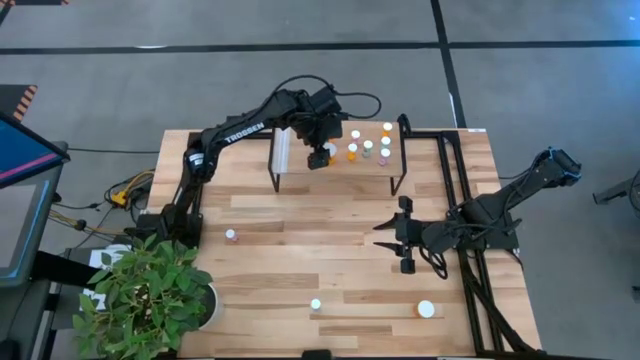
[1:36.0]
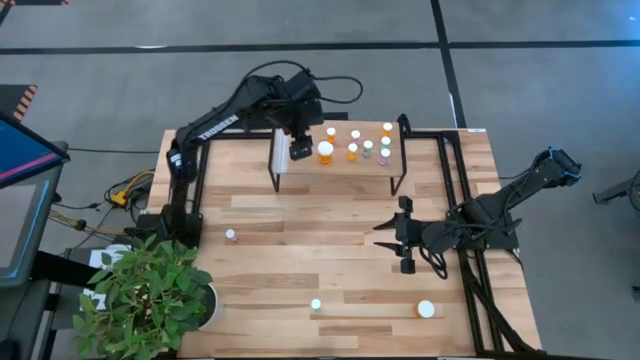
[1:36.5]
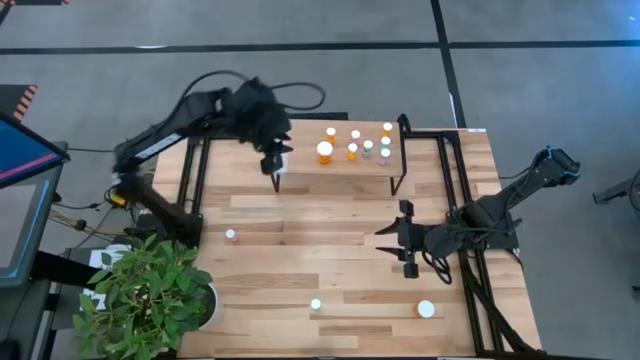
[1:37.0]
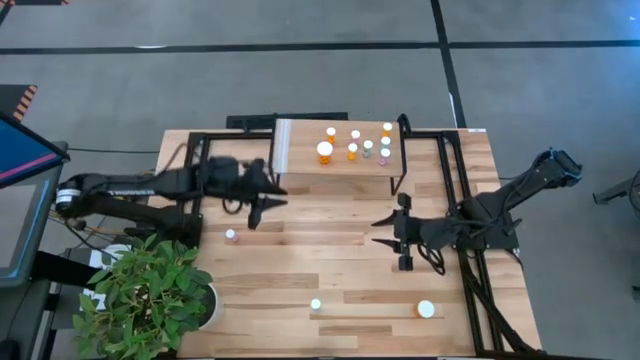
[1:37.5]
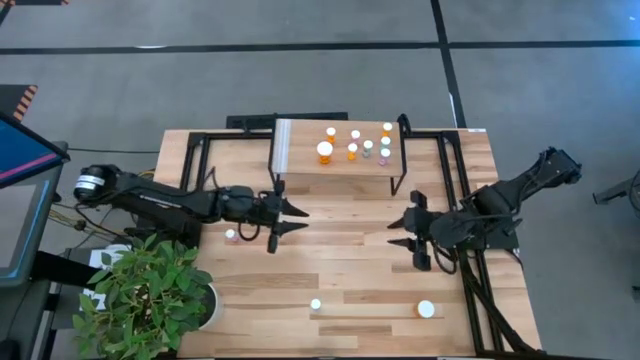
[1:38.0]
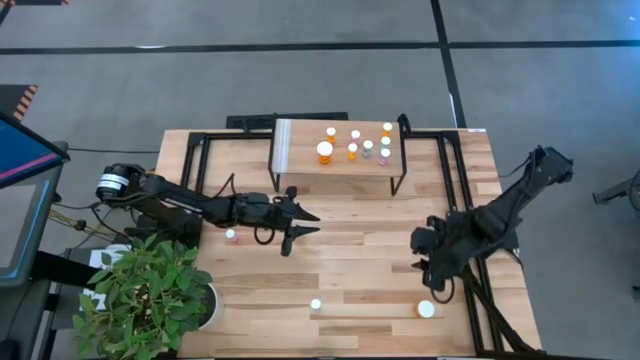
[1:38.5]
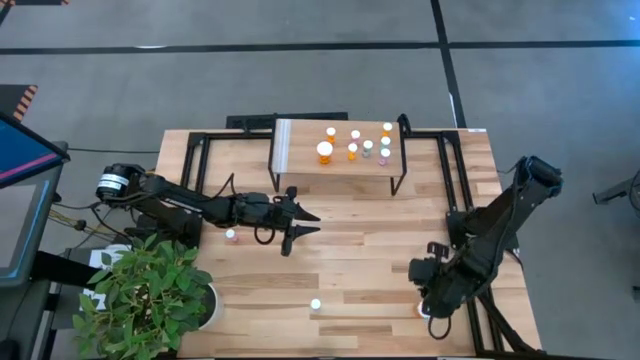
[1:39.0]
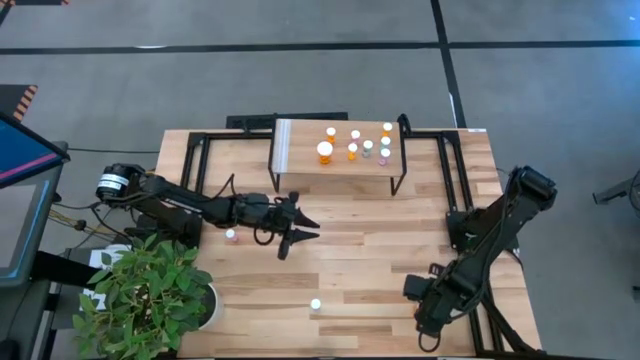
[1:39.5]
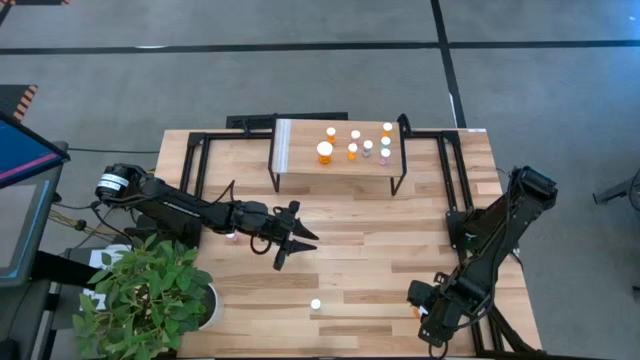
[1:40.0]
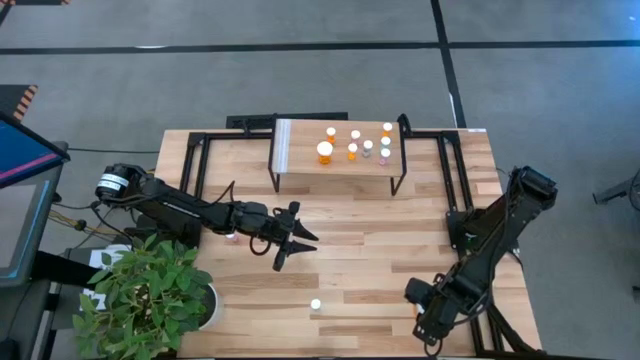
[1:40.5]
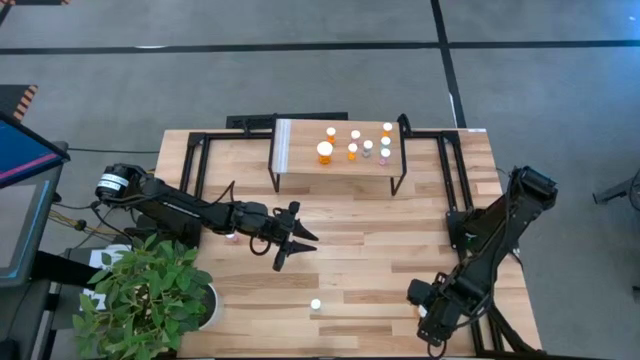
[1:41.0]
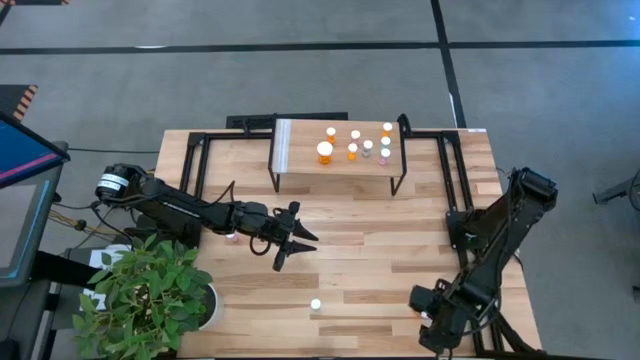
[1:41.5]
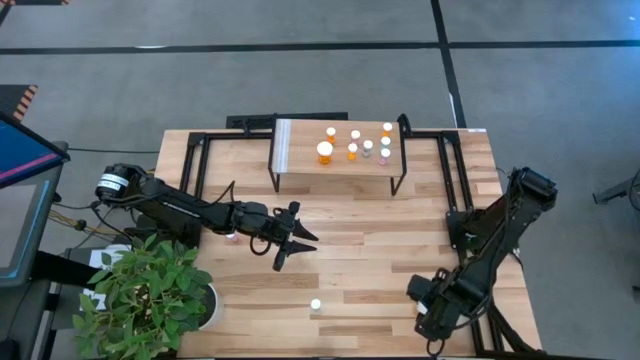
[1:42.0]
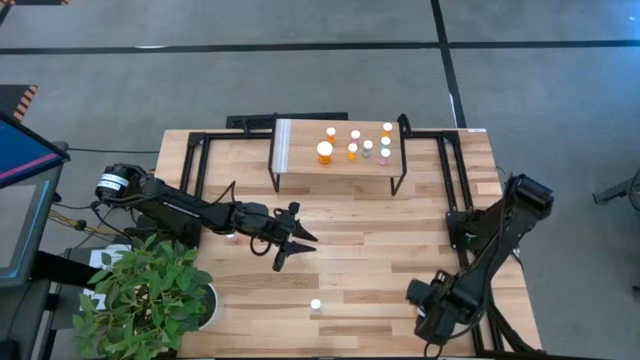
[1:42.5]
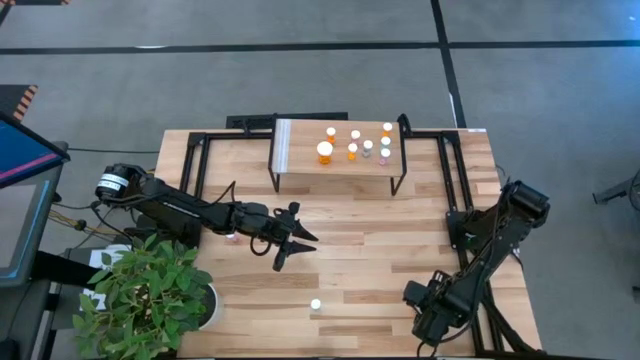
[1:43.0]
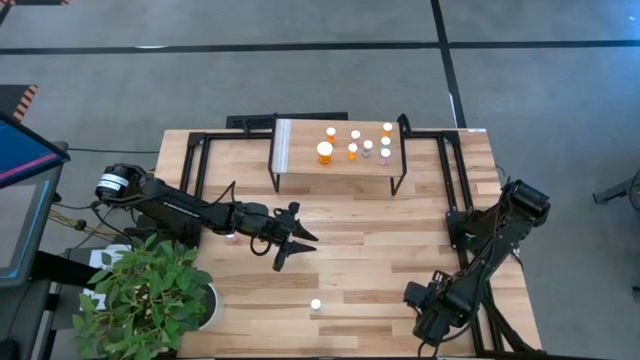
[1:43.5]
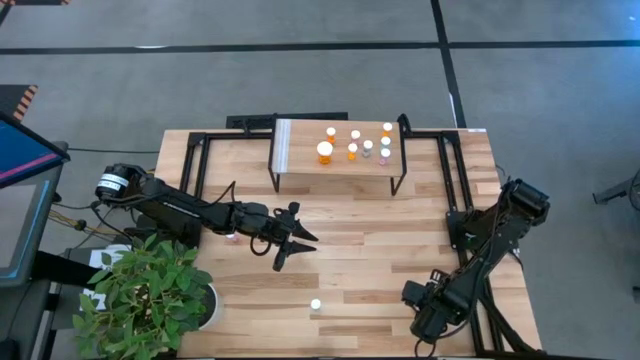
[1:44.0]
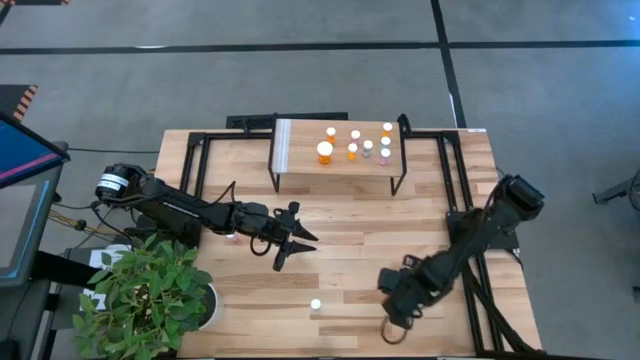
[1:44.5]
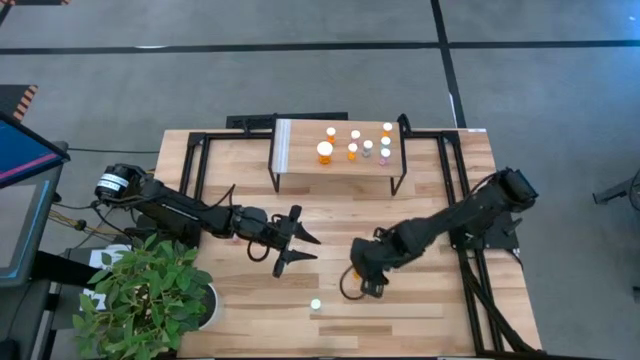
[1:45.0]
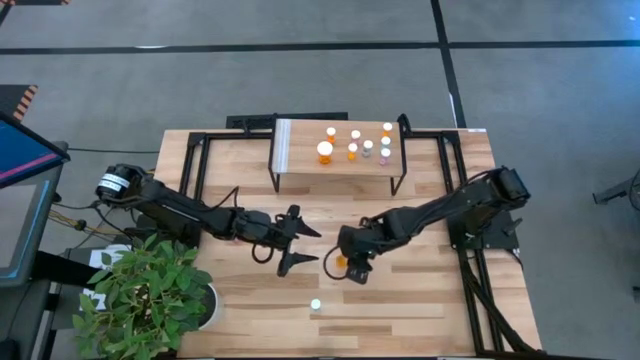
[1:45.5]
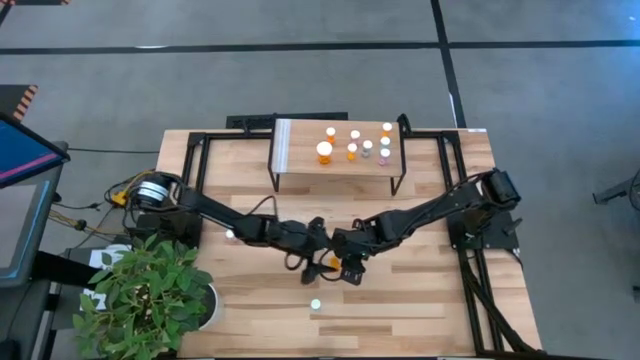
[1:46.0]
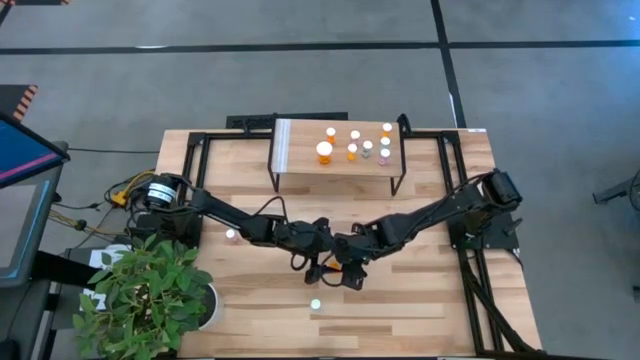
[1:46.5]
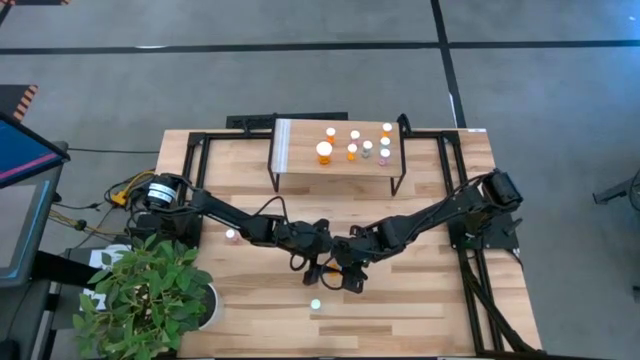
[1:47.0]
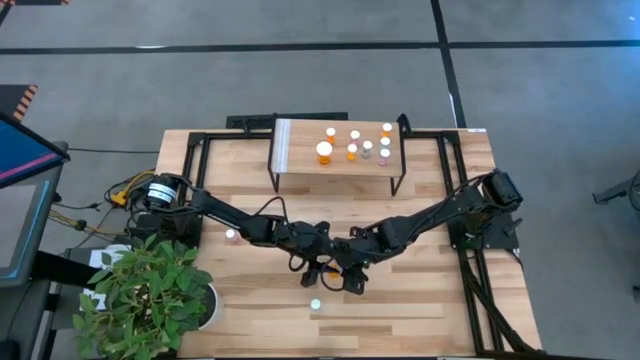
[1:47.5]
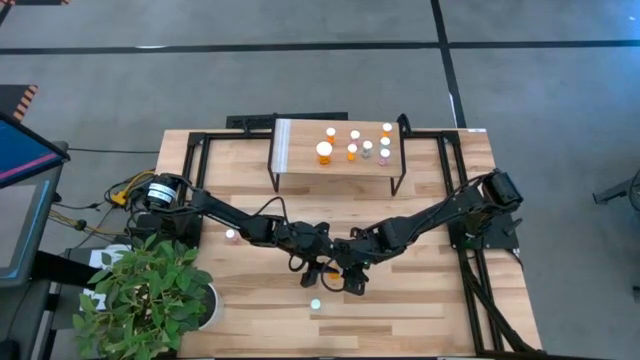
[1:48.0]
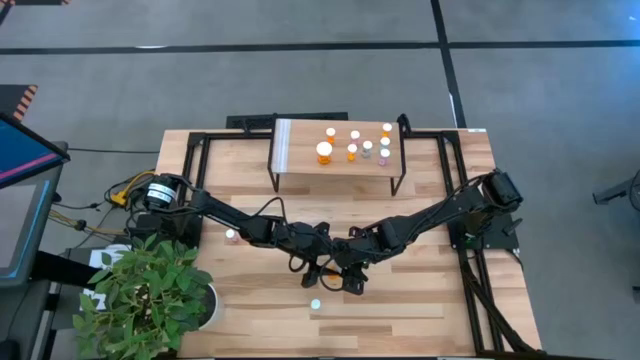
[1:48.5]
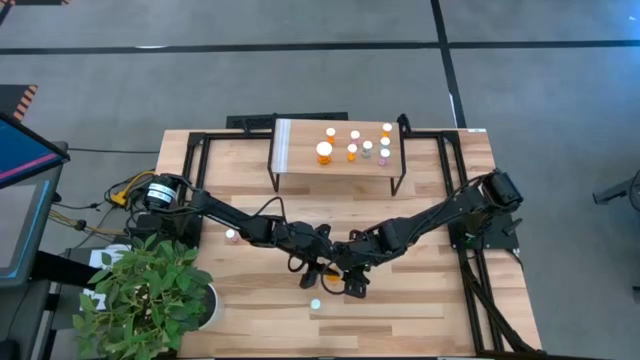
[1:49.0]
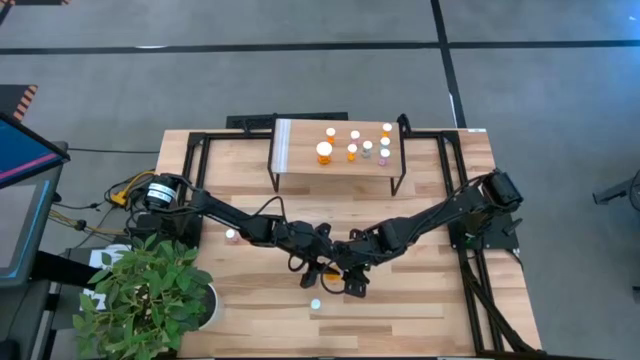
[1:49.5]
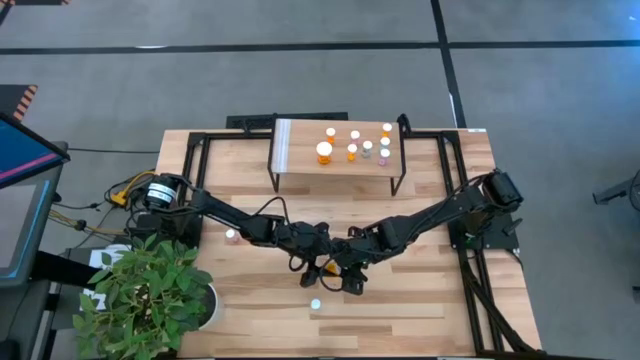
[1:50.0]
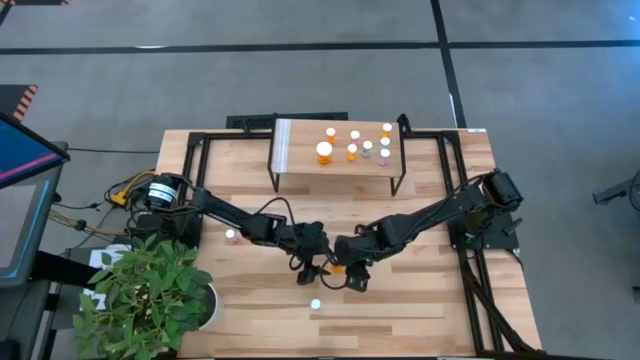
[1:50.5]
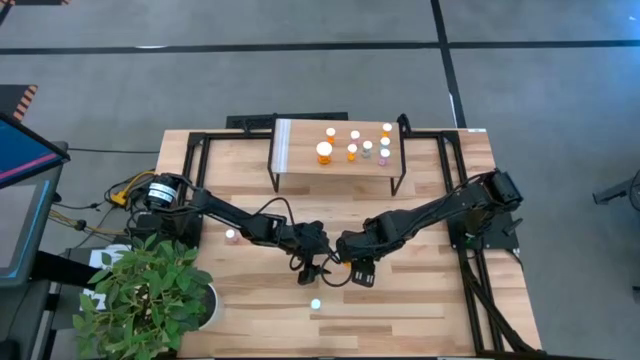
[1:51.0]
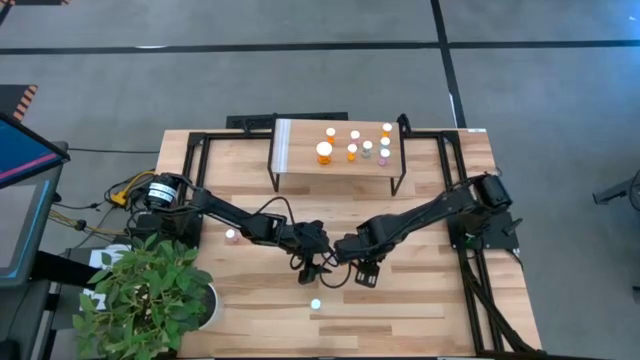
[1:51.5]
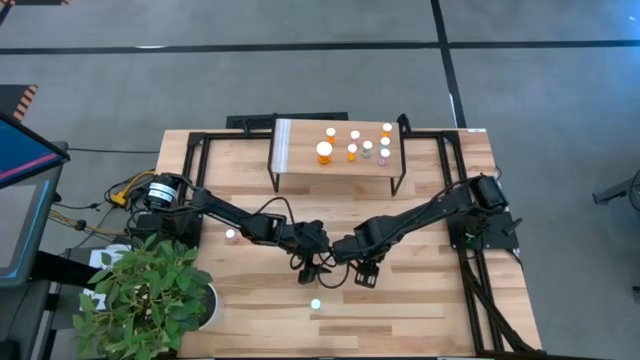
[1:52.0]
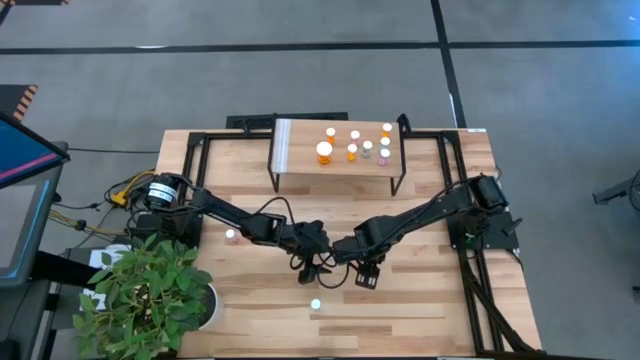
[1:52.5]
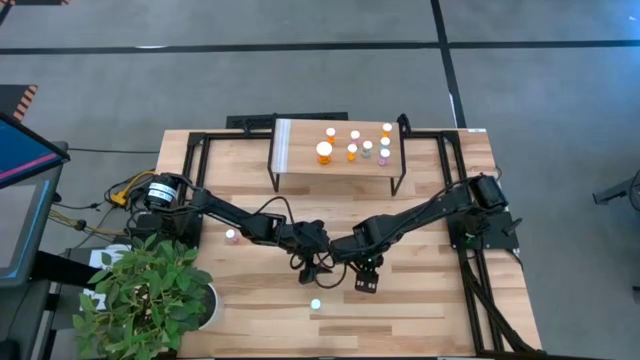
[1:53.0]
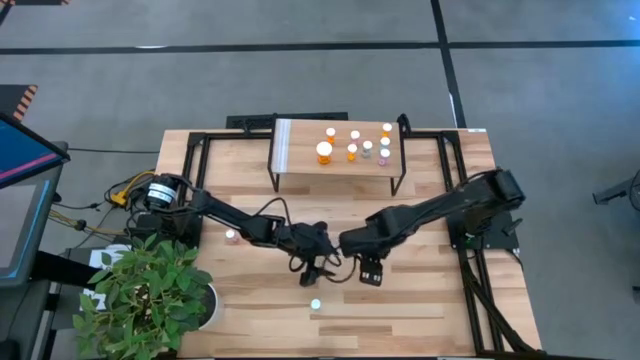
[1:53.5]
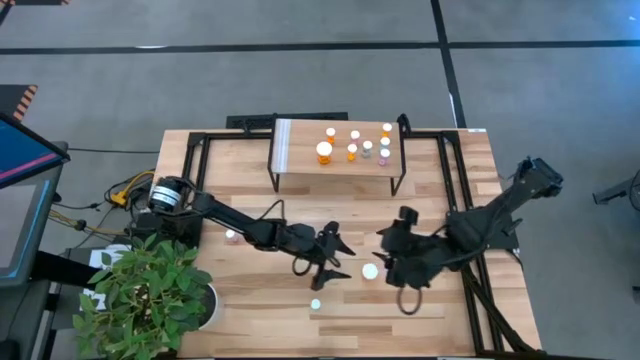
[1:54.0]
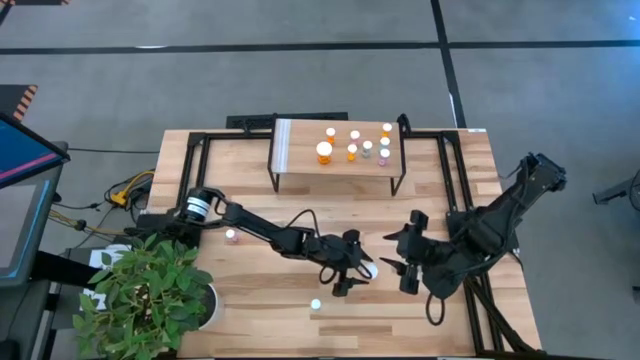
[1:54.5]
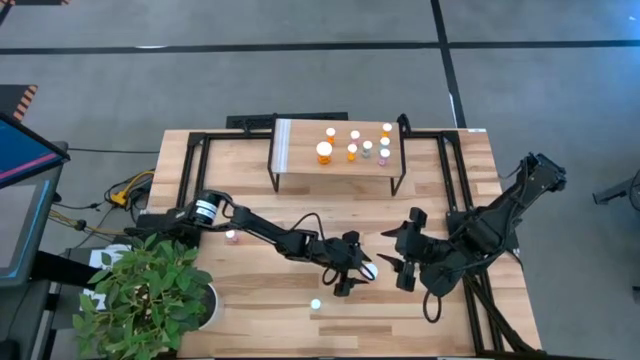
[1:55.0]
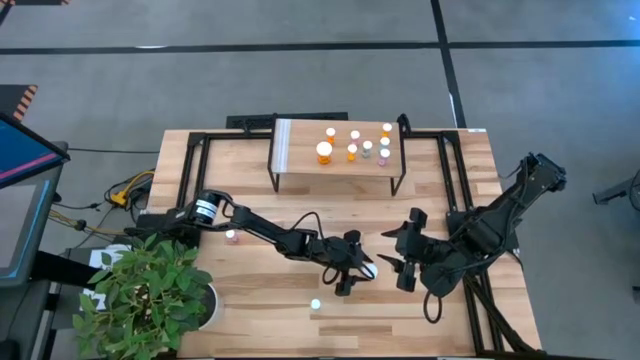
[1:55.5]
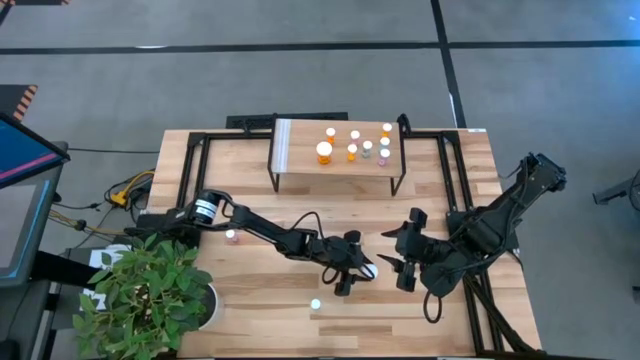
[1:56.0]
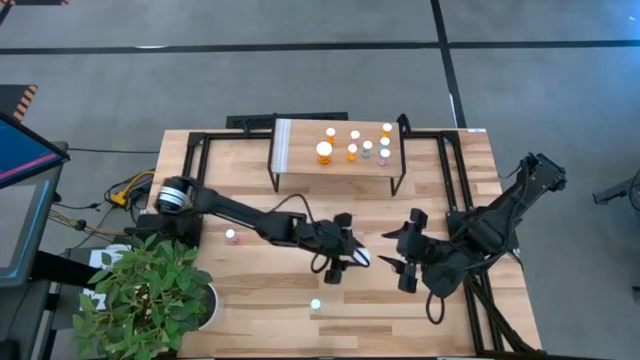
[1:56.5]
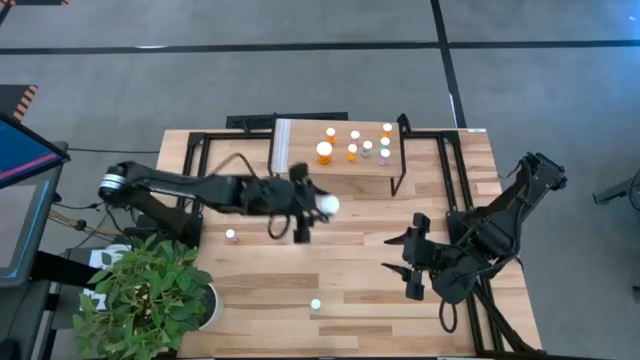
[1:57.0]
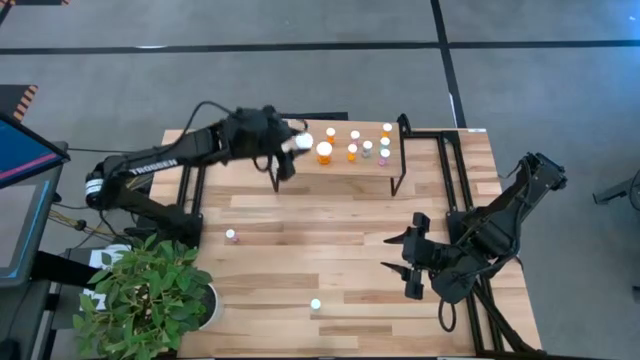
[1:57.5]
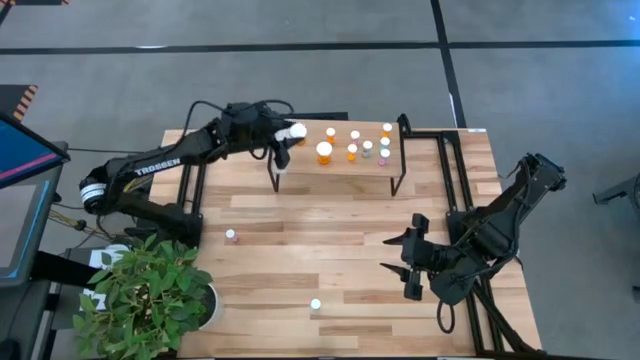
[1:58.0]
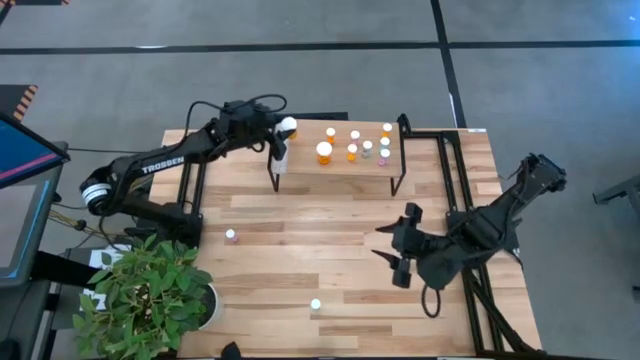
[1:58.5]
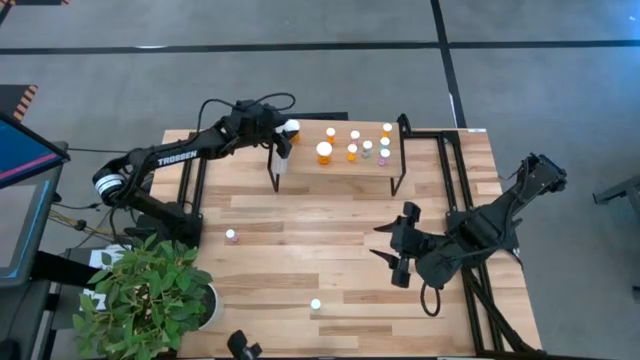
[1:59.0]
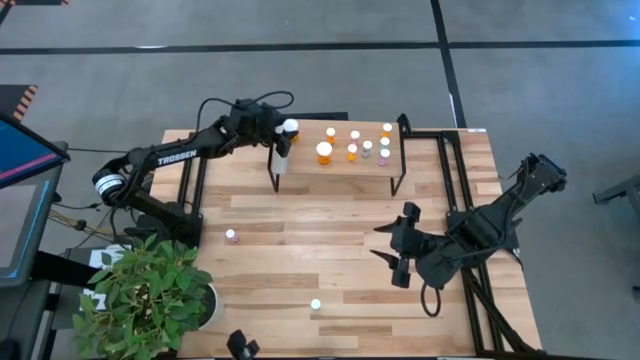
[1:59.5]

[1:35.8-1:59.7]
Task: Pick and place medicine bottles onto shelf by color
Put the big orange pill bottle on the shelf
